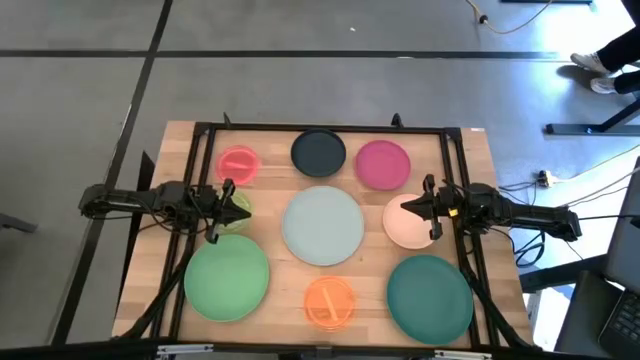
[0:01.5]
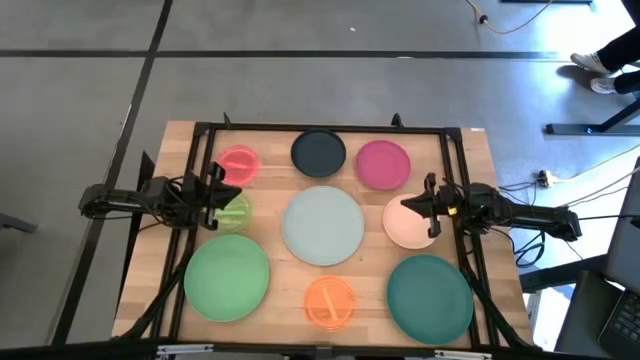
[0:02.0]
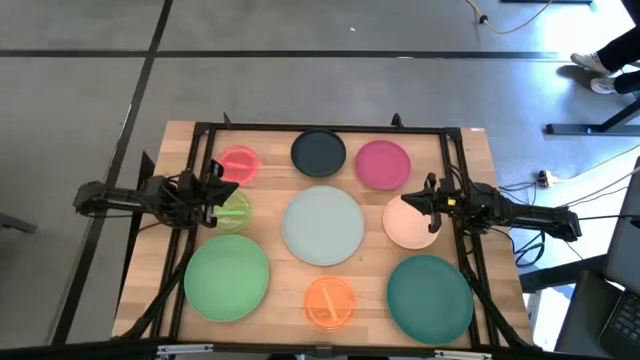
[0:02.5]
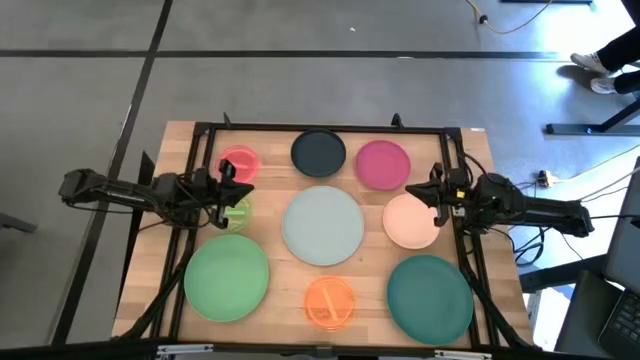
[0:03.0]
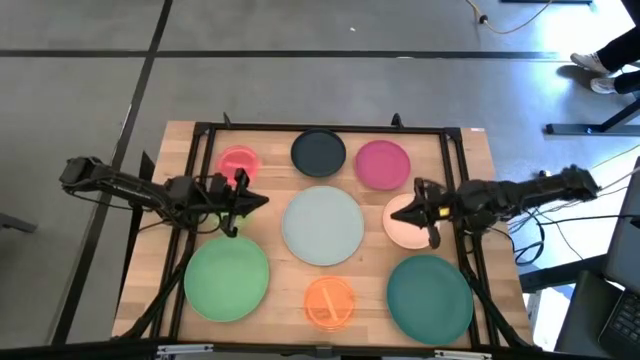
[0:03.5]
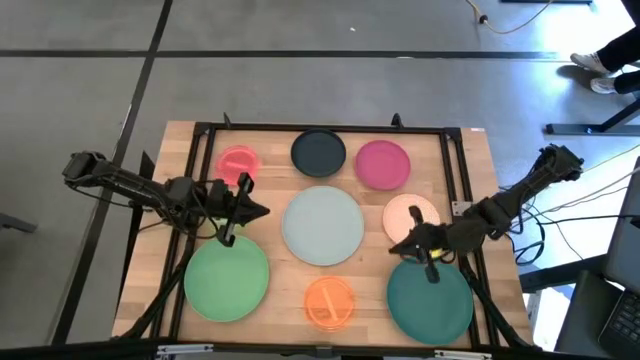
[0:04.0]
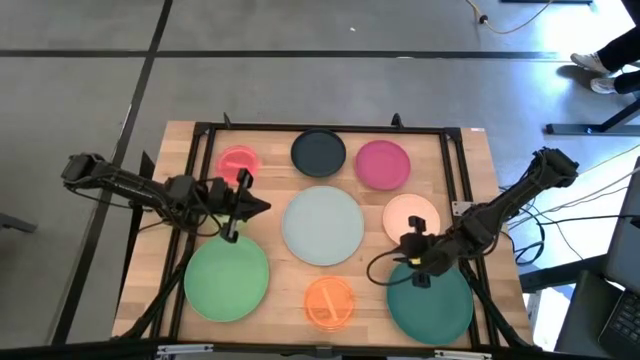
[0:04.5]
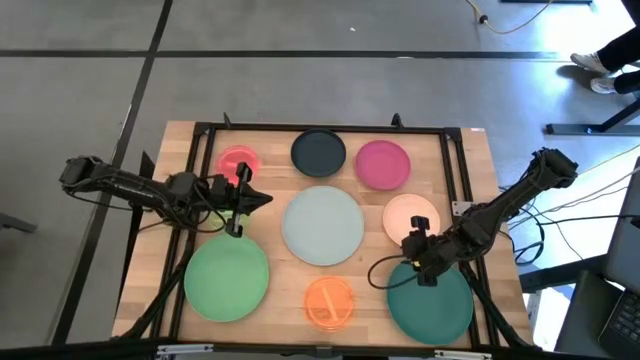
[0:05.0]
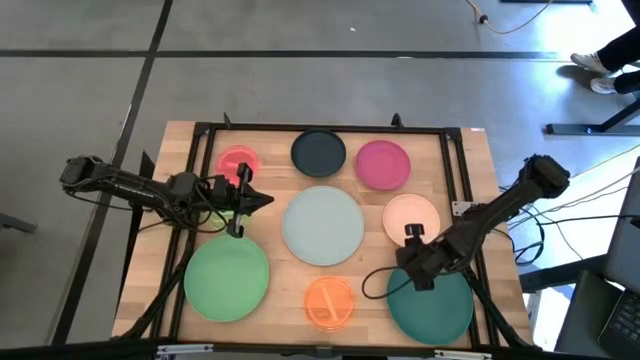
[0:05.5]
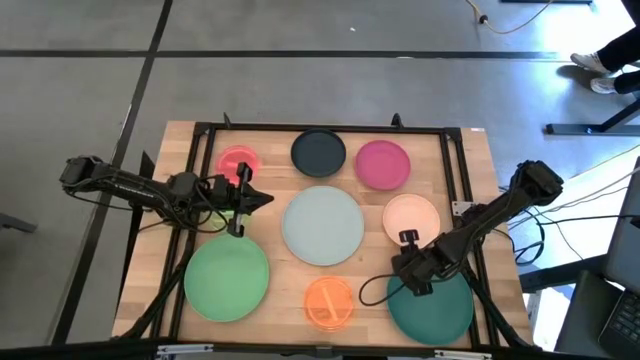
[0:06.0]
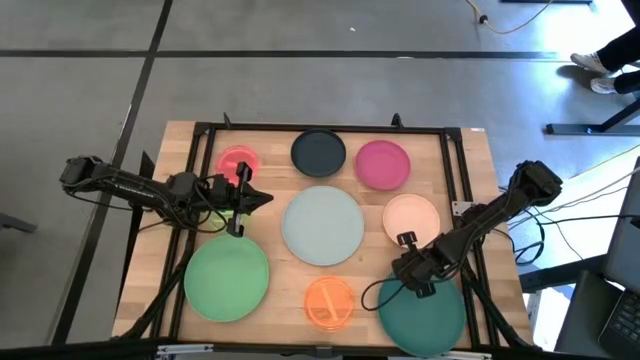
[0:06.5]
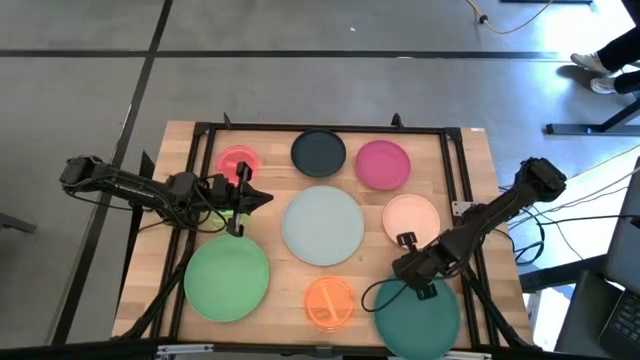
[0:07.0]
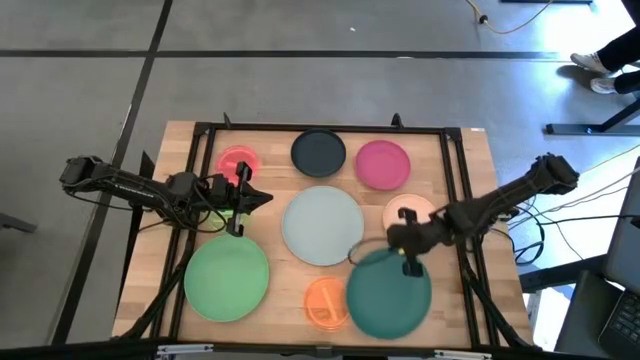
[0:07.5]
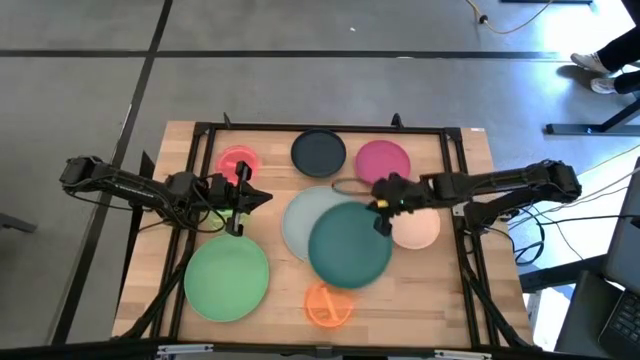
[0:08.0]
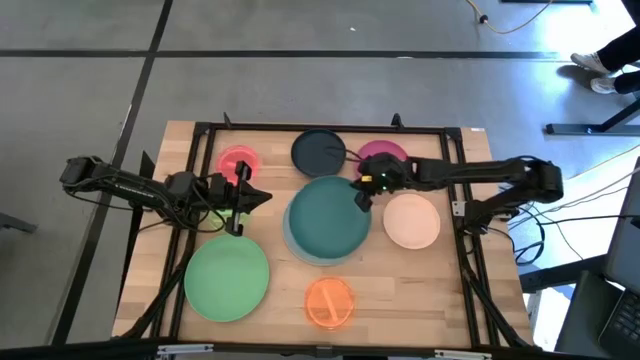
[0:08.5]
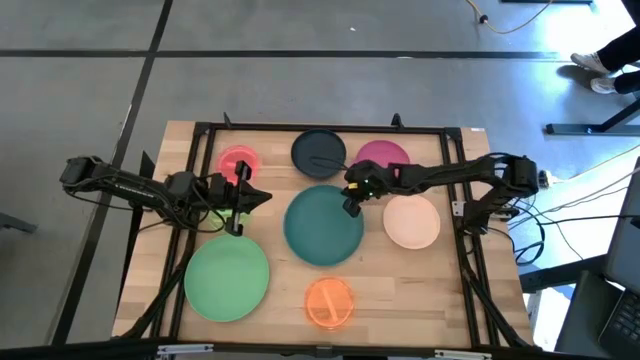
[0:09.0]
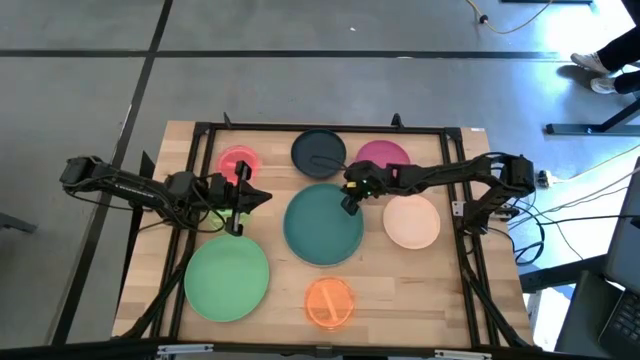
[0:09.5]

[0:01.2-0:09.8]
Task: Stack plastic plates
Stack the dark green plate on top of the light blue plate

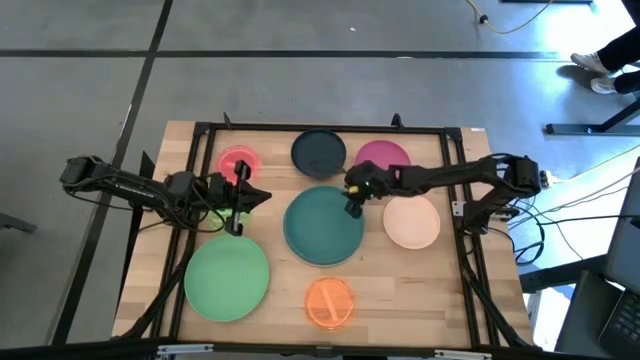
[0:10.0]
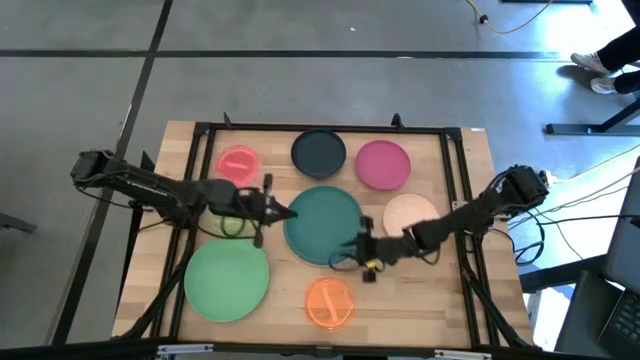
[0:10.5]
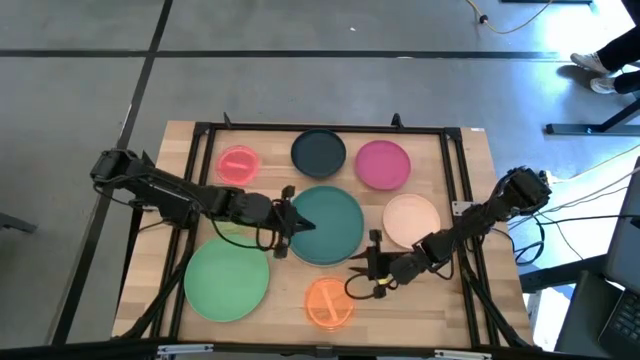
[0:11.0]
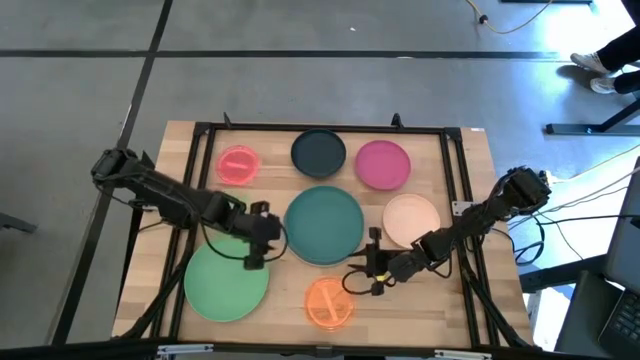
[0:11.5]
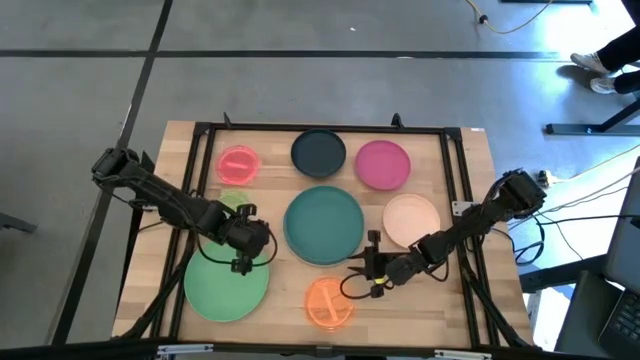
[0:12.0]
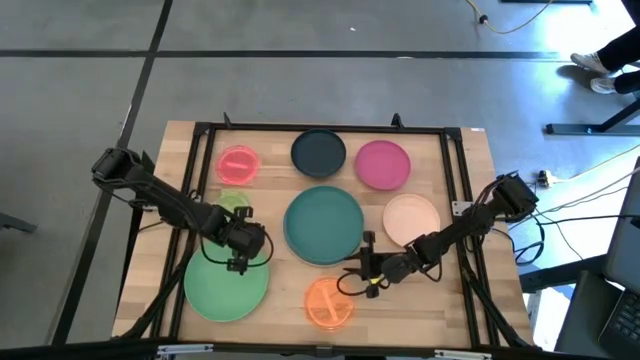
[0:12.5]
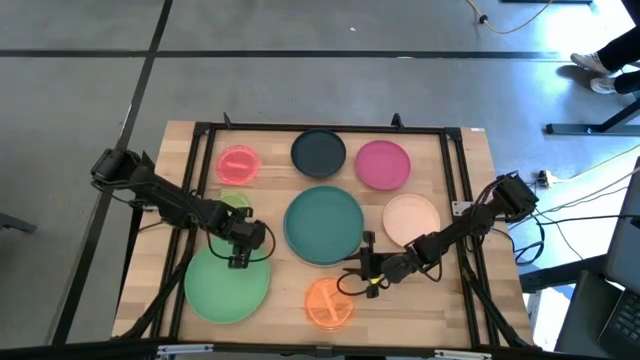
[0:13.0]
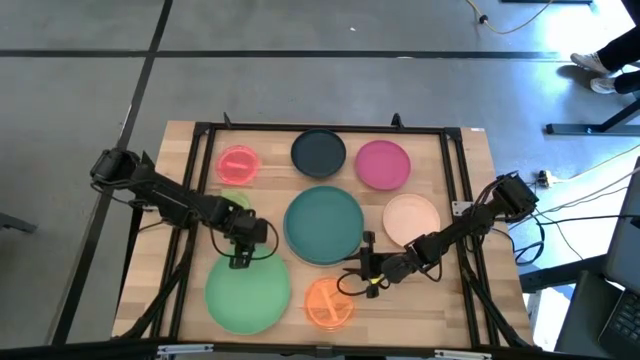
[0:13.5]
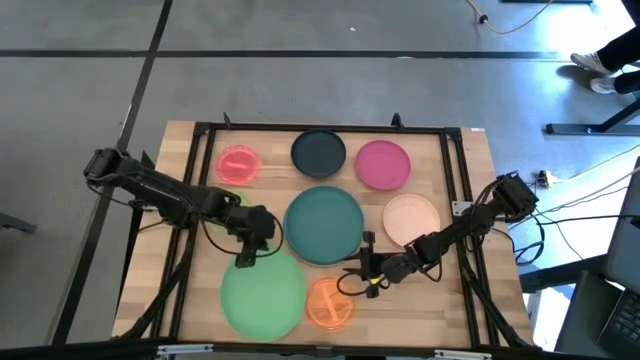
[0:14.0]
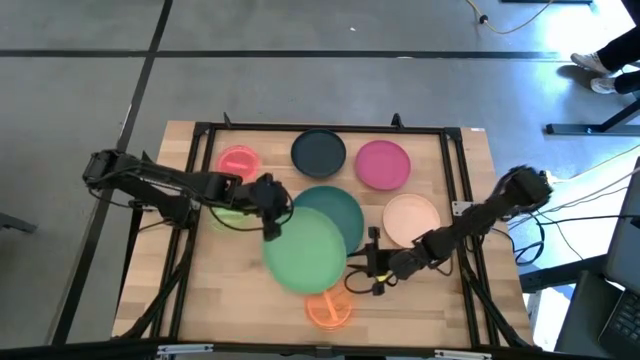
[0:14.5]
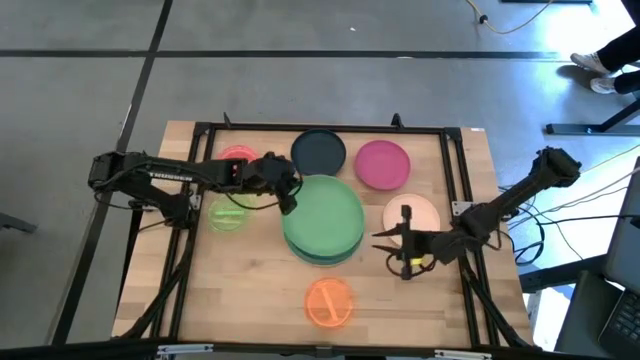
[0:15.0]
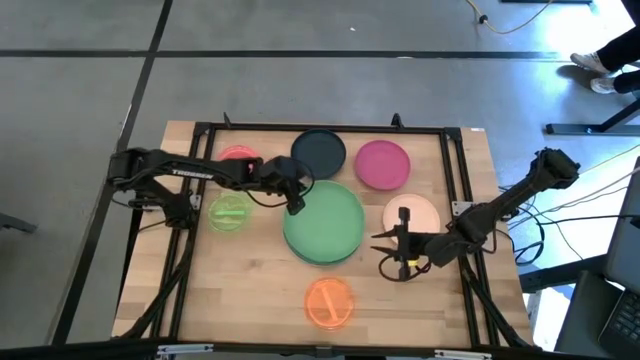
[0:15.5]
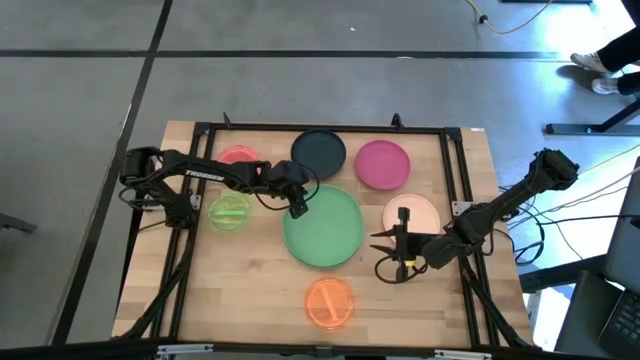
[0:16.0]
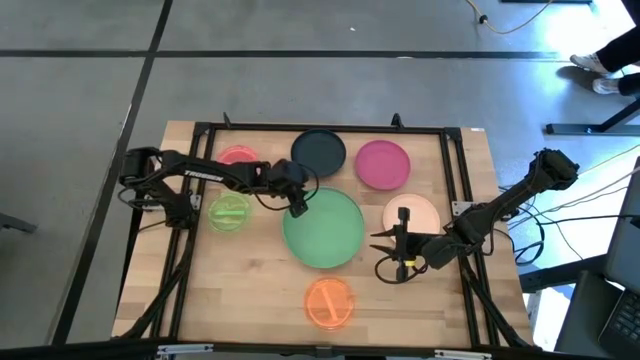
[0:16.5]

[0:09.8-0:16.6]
Stack the green plate on top of the dark green plate

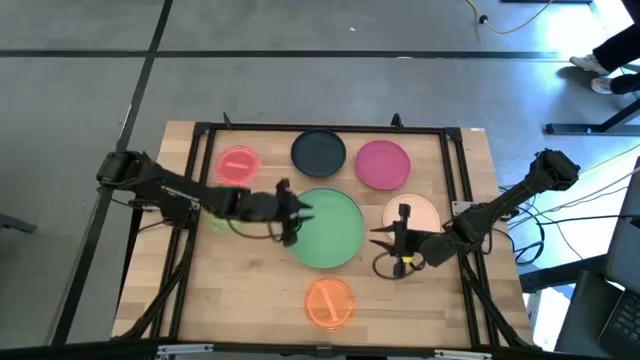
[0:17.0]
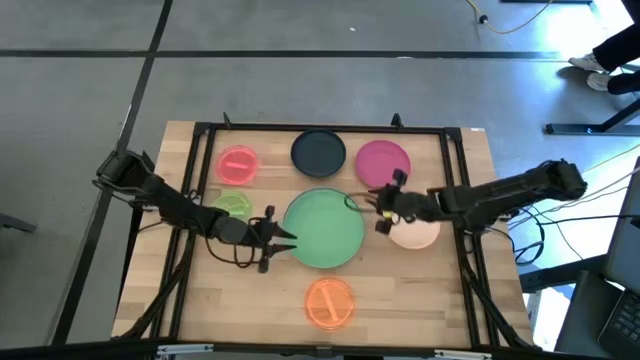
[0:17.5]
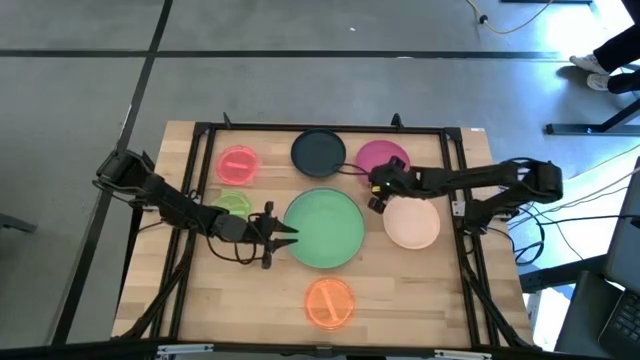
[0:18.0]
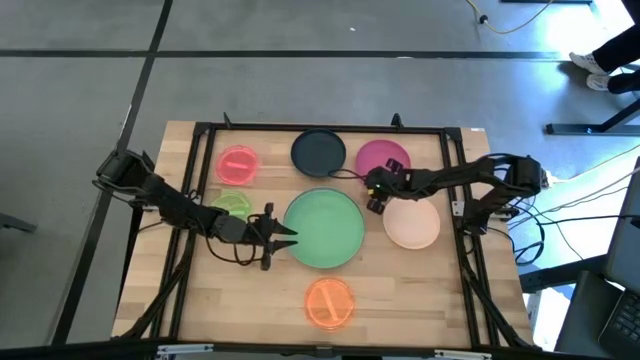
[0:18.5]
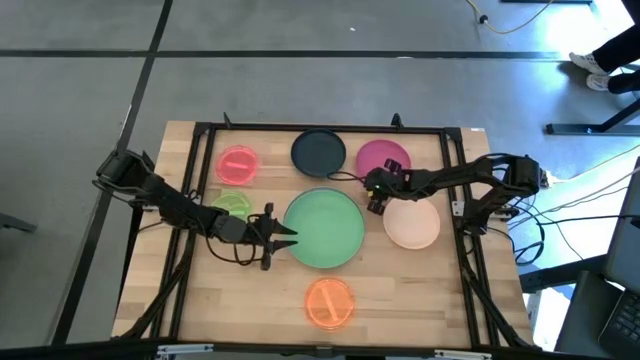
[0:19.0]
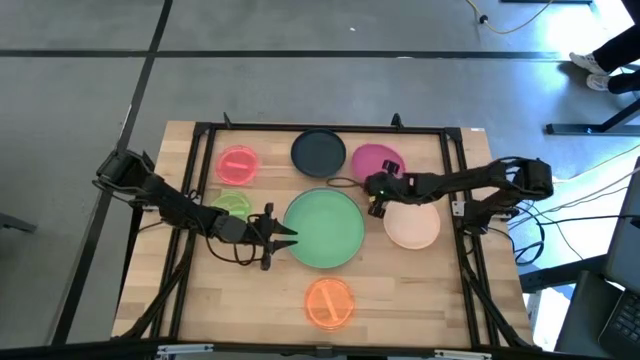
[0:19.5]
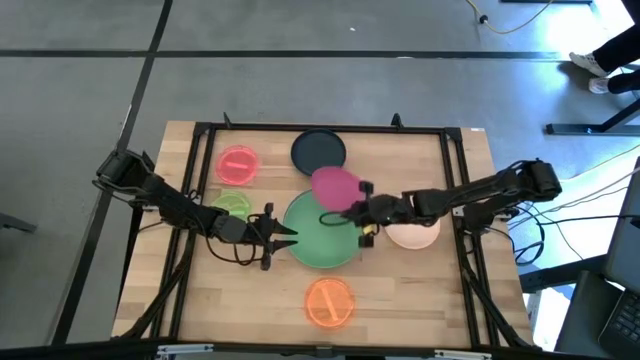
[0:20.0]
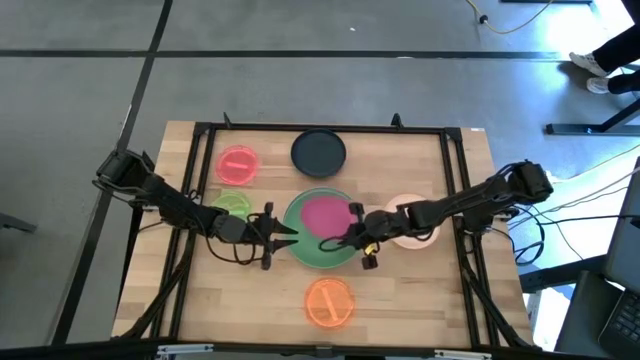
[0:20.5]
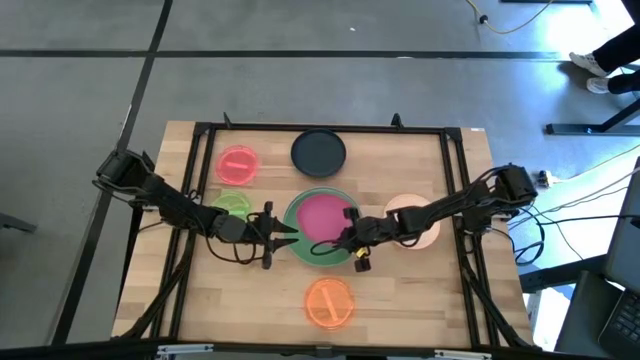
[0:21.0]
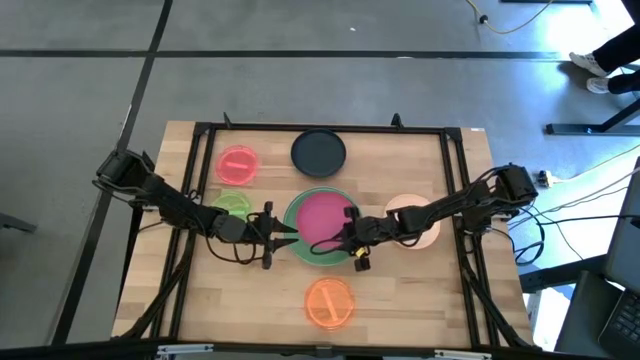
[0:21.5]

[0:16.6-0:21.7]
Stack the pink plate on top of the green plate

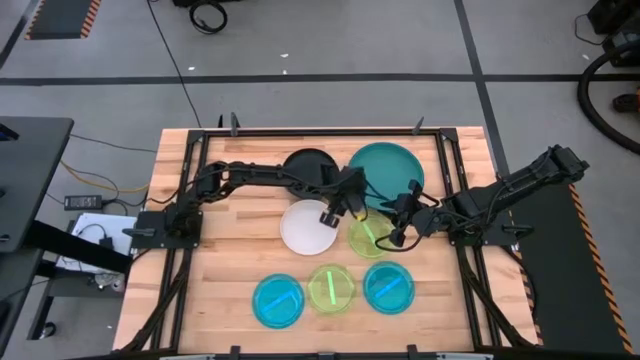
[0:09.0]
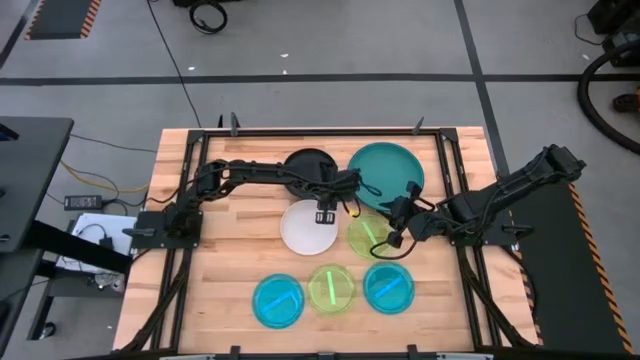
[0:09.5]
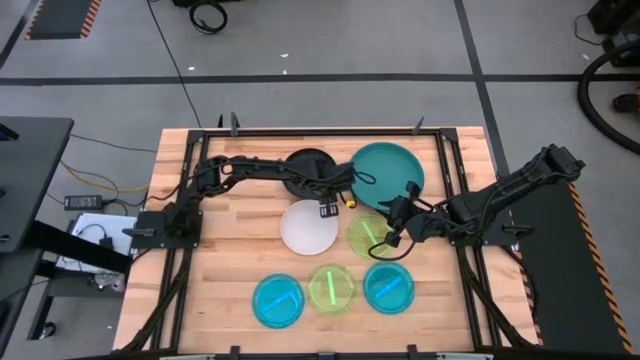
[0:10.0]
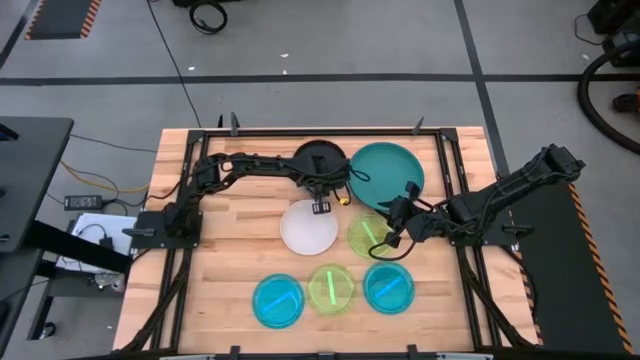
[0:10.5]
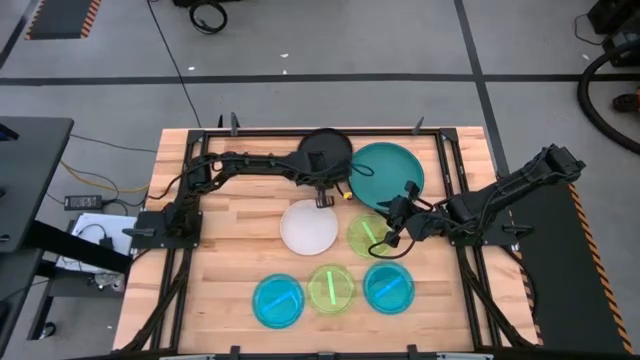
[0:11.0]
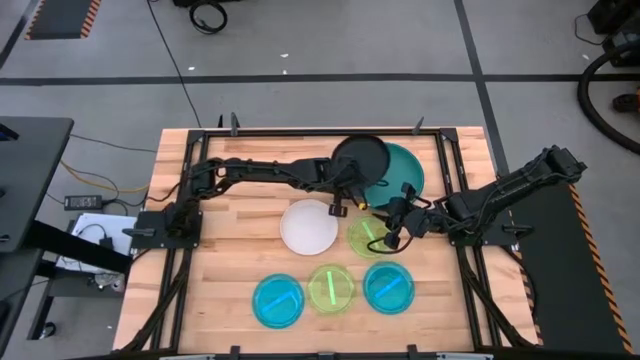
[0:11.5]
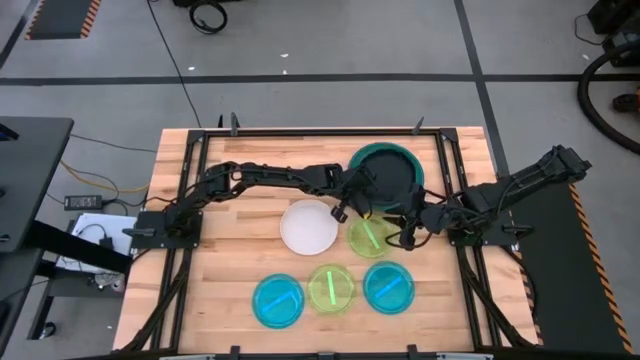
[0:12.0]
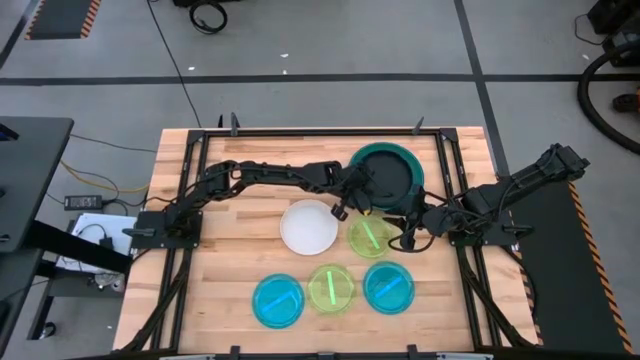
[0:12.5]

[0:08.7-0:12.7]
Task: Stack plastic plates
Stack the black plate on the green plate
